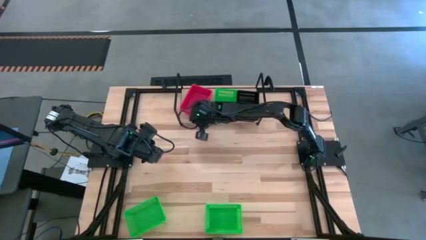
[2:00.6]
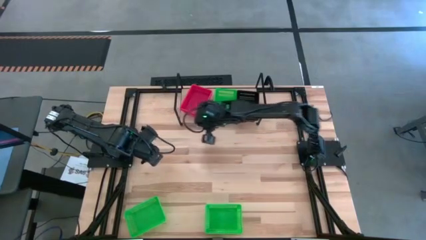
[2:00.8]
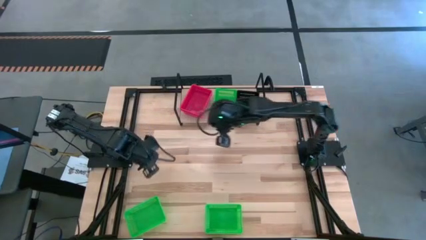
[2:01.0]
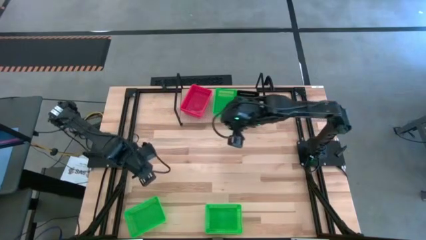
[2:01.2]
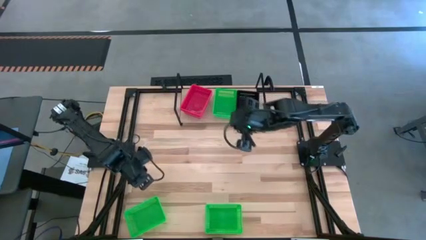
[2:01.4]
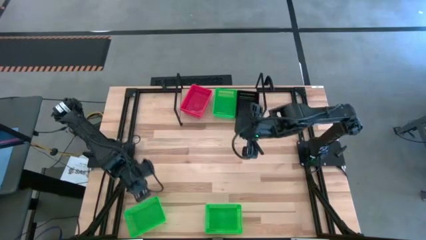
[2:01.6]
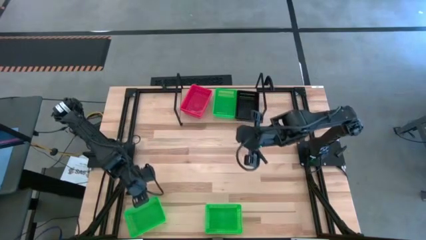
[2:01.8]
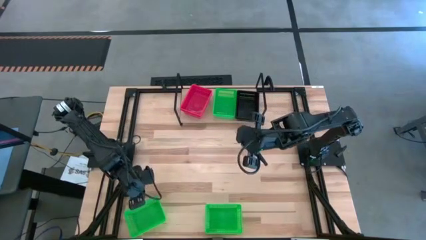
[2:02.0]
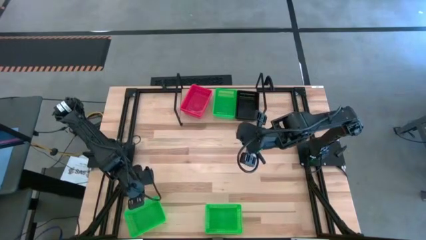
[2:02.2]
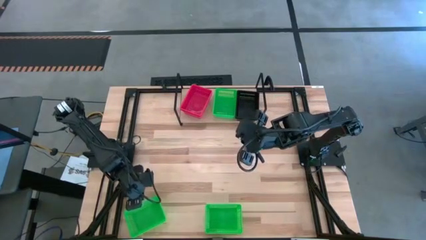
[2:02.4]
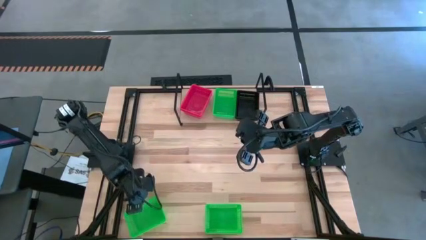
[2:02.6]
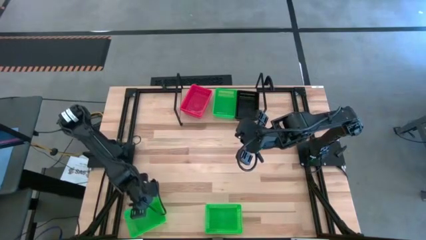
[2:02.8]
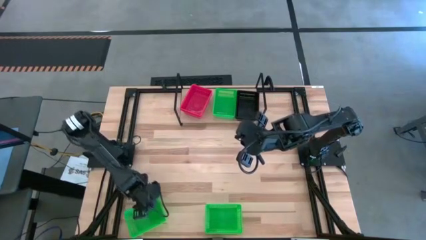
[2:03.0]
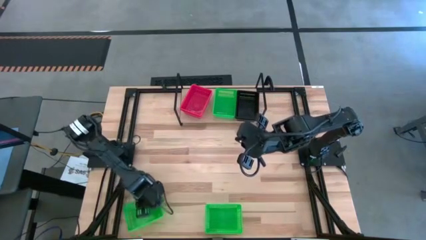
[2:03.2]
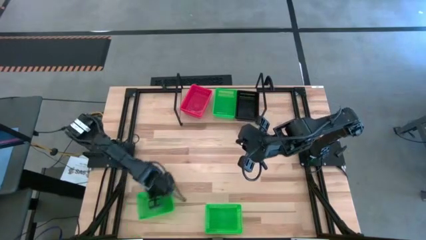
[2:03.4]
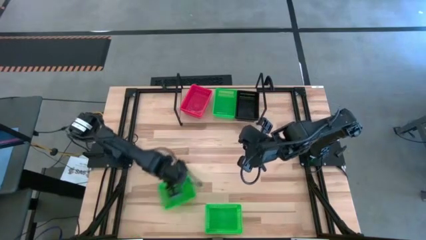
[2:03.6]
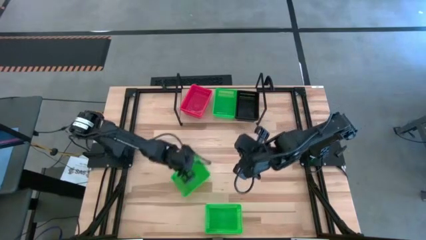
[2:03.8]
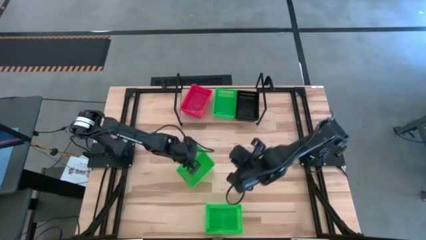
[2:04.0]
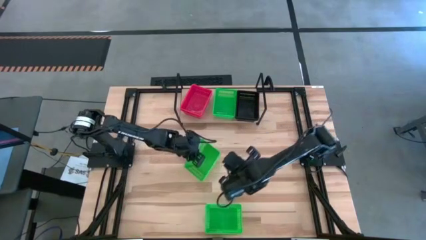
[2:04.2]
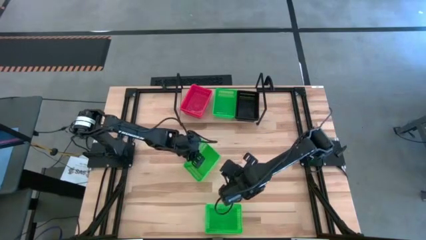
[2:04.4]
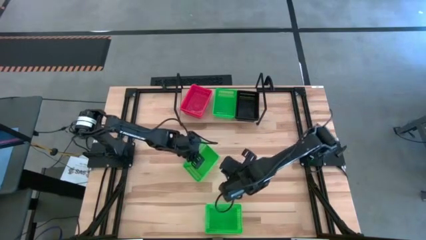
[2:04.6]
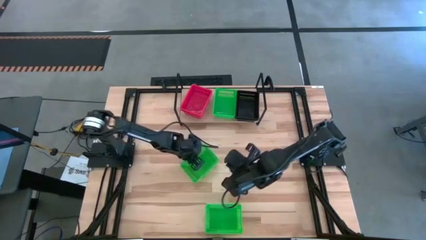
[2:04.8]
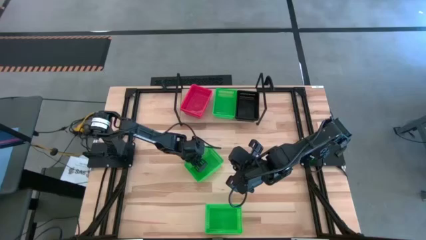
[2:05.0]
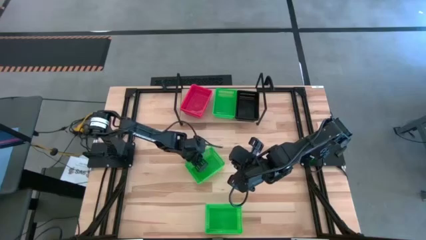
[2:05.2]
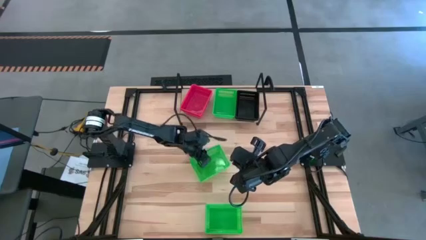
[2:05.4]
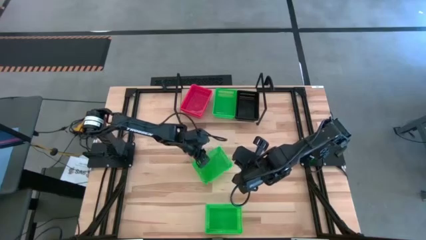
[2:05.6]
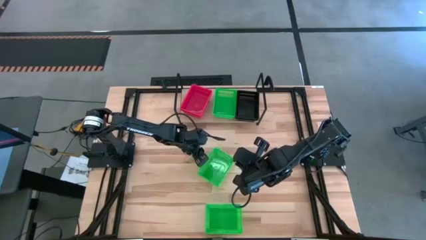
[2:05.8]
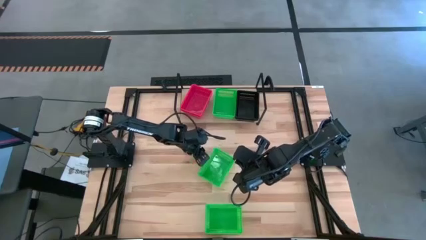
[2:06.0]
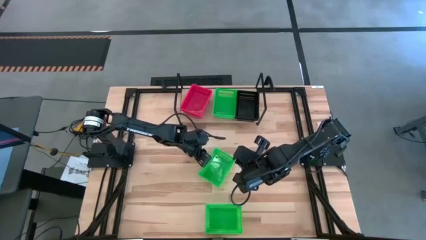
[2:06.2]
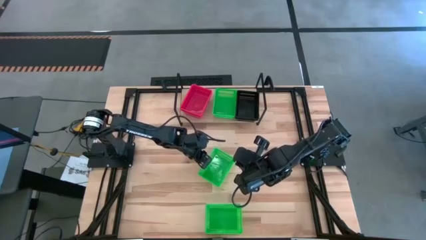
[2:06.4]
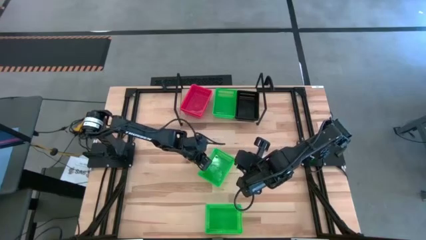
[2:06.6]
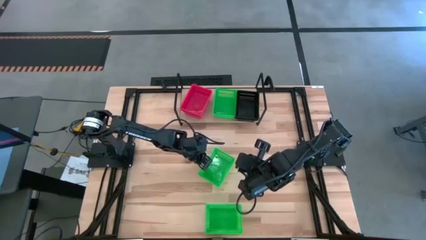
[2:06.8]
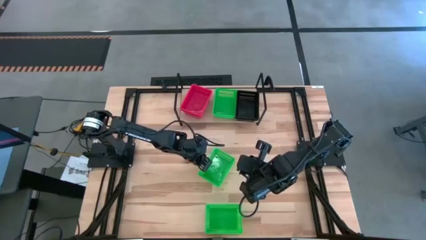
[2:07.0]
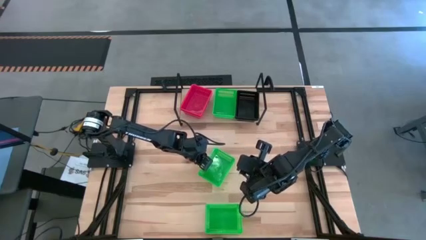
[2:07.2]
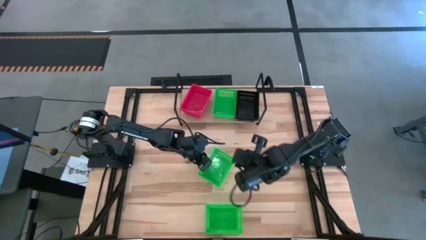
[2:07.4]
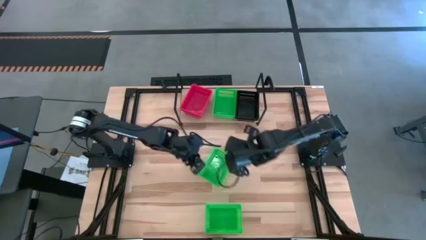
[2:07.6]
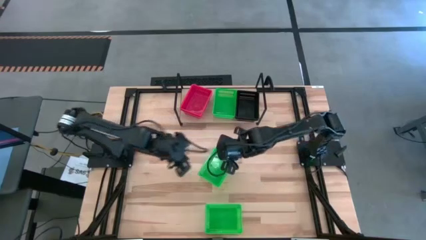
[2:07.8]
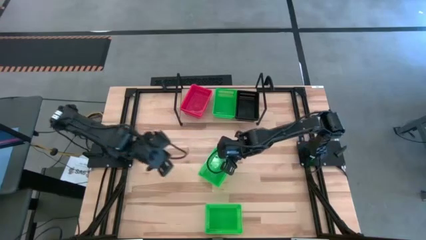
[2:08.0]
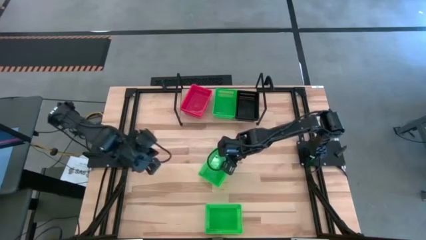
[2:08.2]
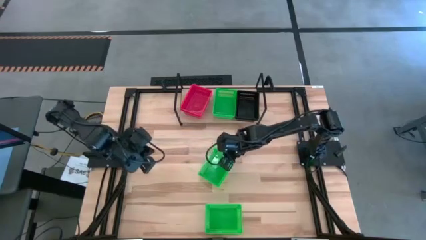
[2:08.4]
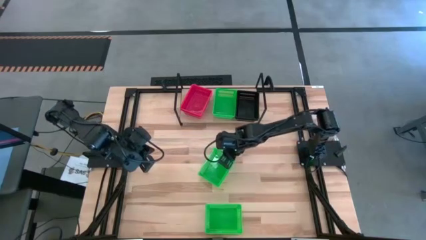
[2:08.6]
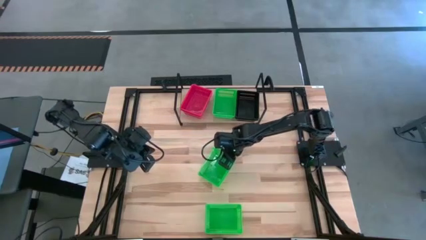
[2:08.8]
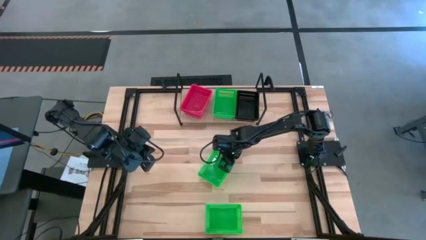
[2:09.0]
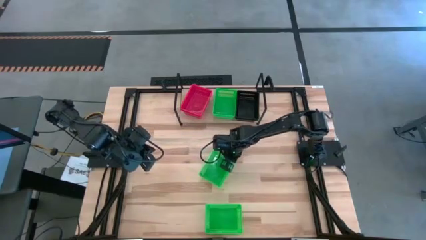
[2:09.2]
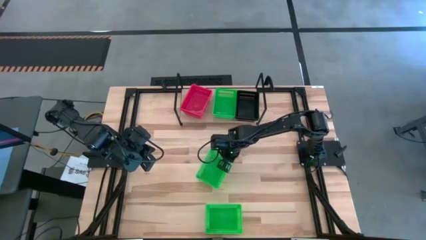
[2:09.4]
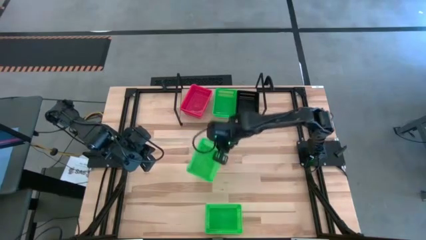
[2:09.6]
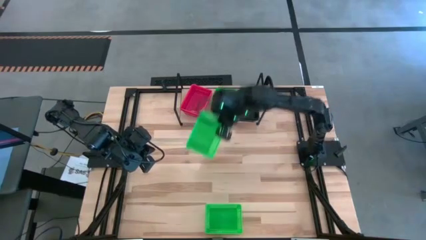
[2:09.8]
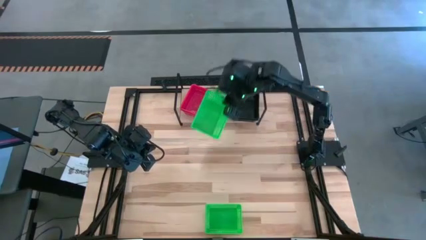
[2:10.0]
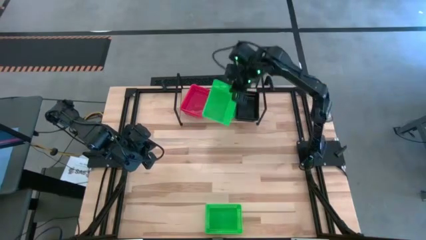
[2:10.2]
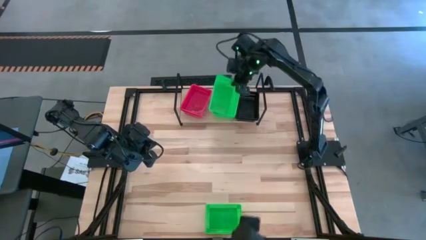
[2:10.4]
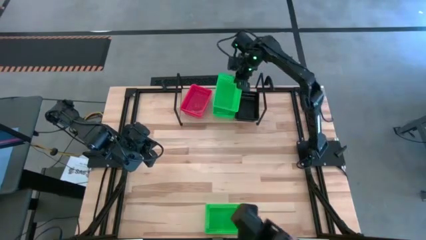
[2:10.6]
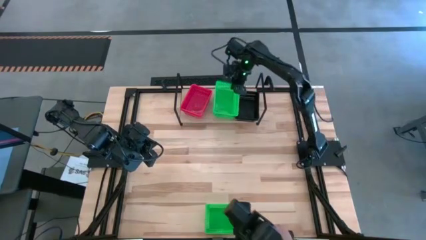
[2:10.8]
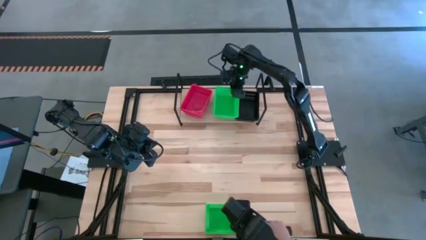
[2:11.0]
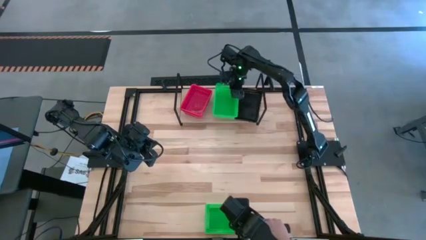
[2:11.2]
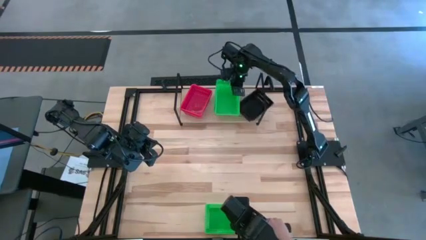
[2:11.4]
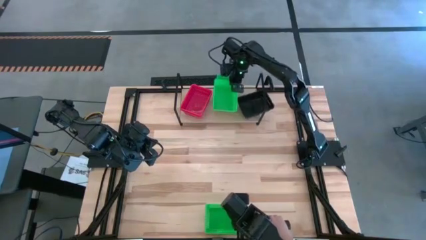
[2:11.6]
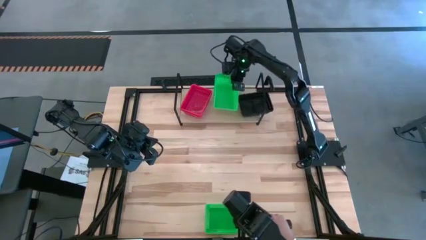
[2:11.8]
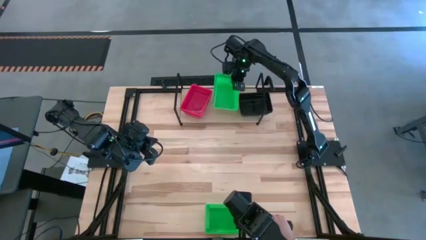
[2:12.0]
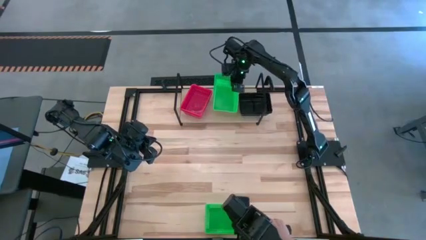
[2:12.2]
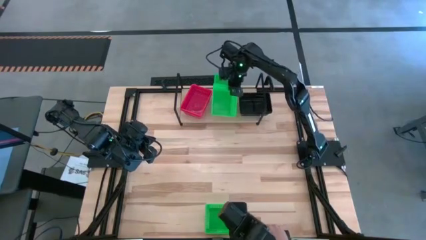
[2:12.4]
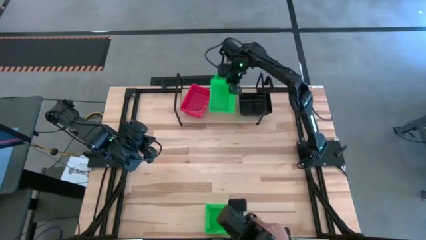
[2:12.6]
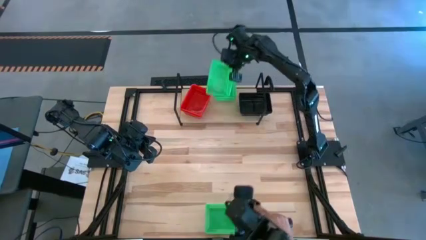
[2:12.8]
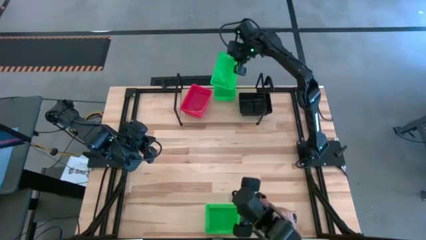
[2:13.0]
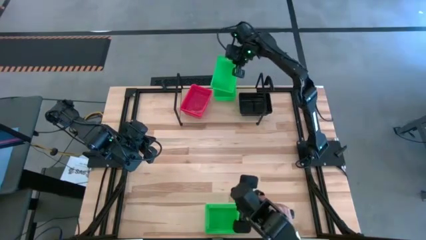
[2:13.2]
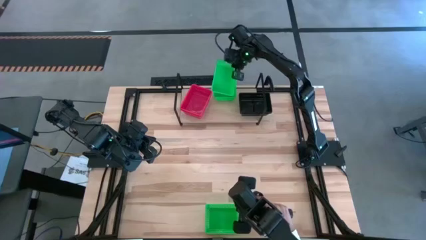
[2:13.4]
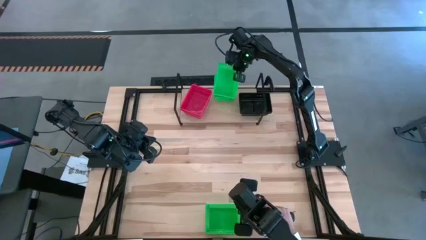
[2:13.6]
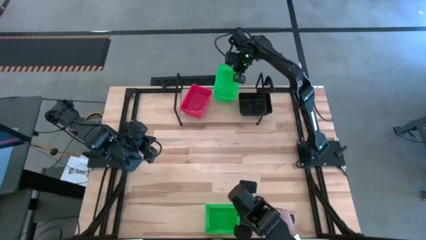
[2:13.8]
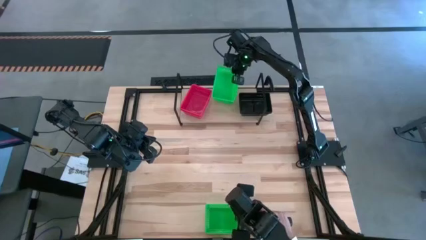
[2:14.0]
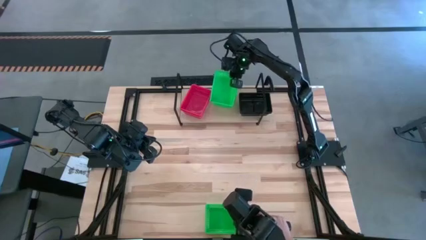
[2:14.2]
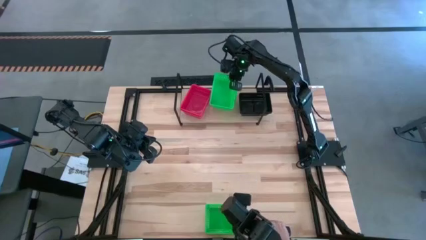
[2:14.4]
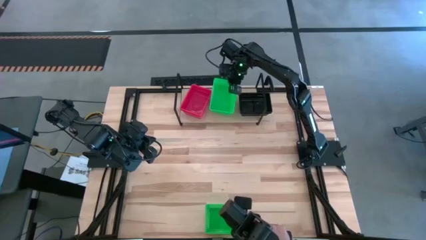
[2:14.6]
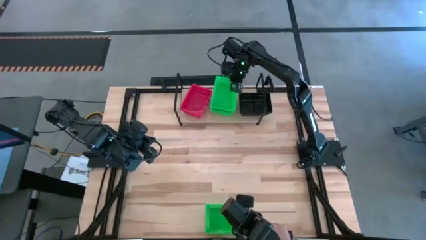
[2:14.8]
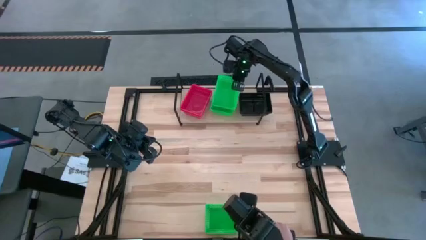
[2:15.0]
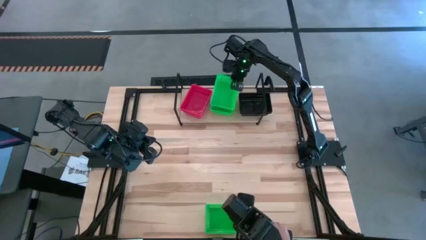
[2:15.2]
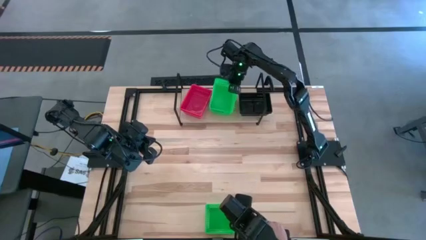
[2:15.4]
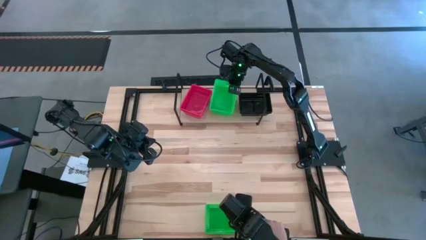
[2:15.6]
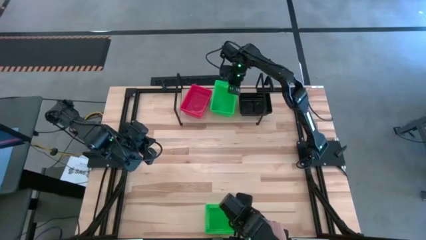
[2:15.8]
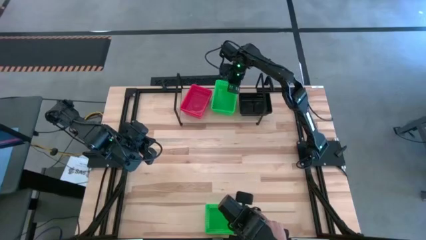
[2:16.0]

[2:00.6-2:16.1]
Task: Stack baskets on shelf by color
Stack the left green bin on top of the other green bin on the shelf
